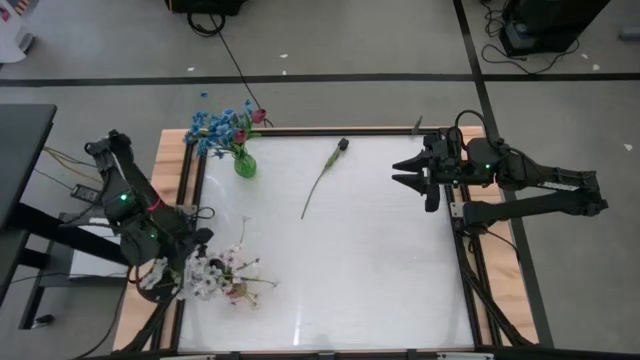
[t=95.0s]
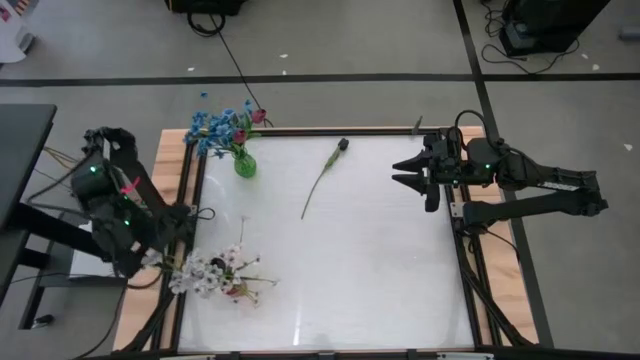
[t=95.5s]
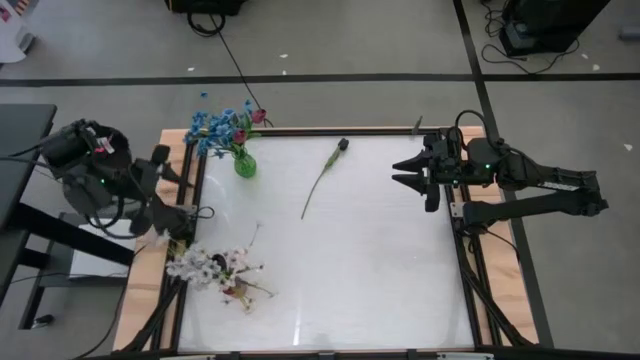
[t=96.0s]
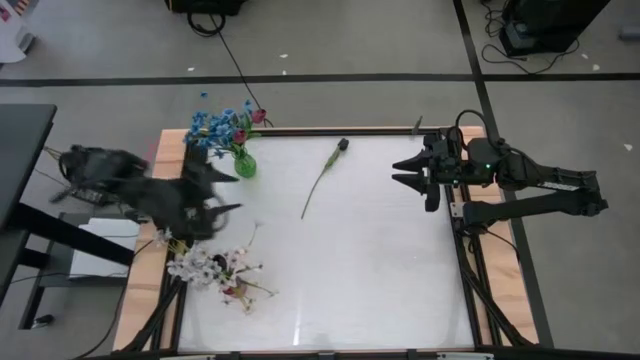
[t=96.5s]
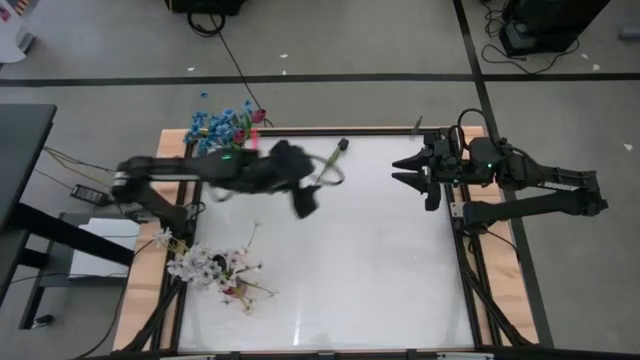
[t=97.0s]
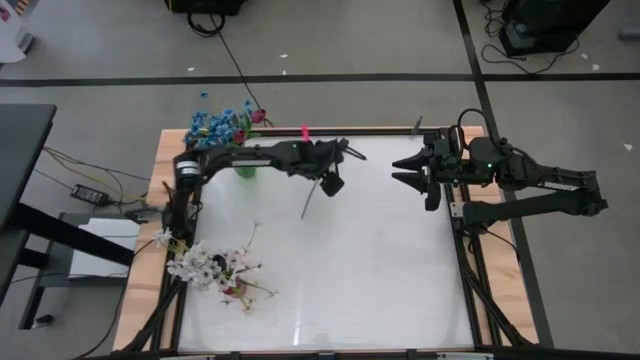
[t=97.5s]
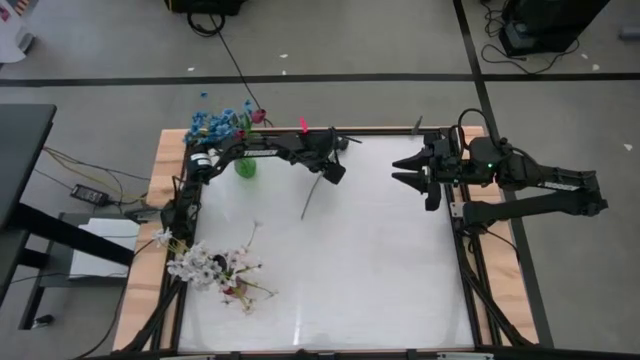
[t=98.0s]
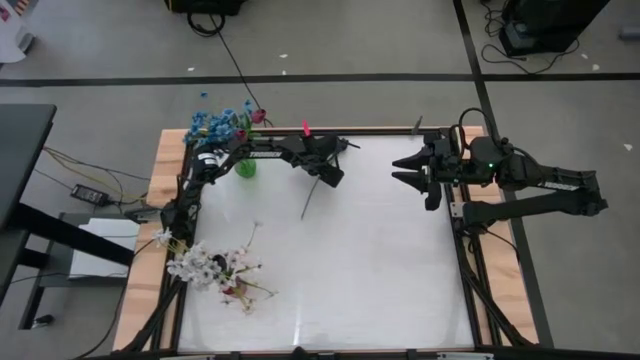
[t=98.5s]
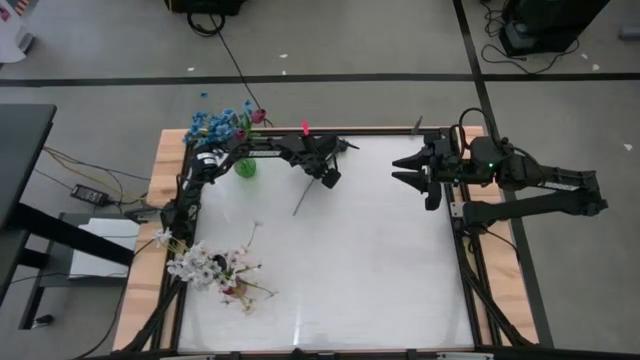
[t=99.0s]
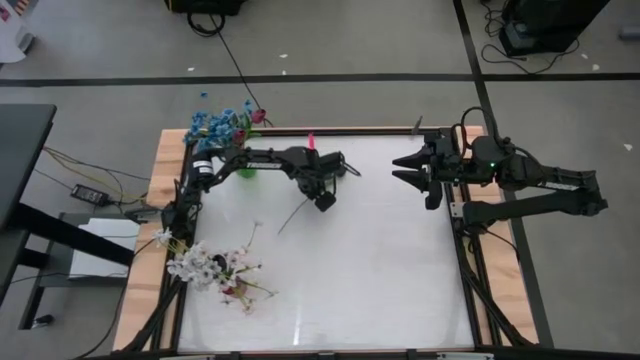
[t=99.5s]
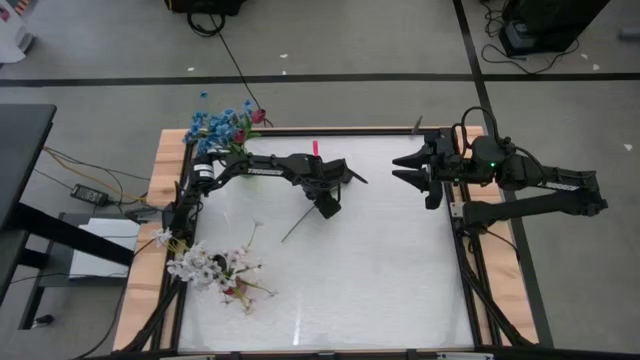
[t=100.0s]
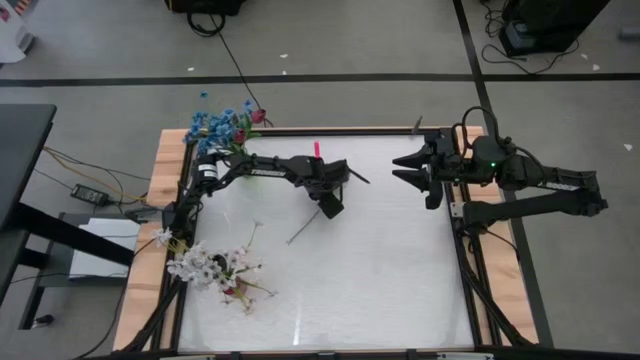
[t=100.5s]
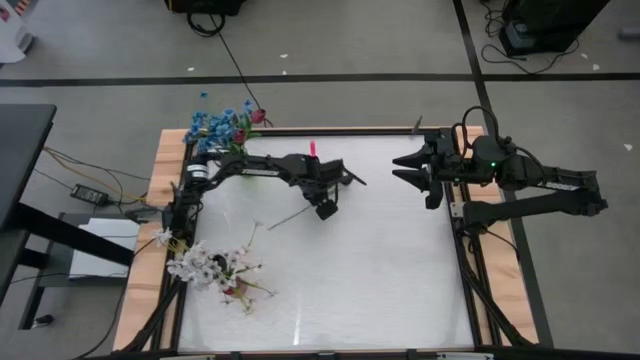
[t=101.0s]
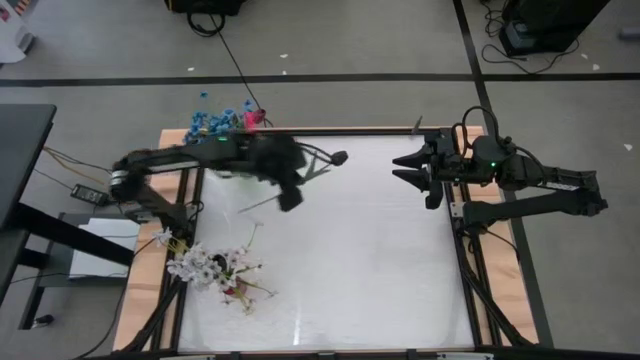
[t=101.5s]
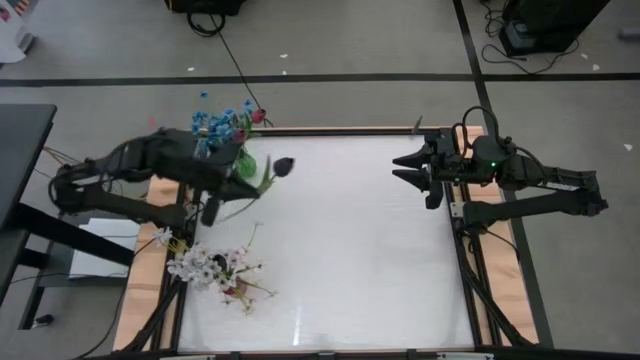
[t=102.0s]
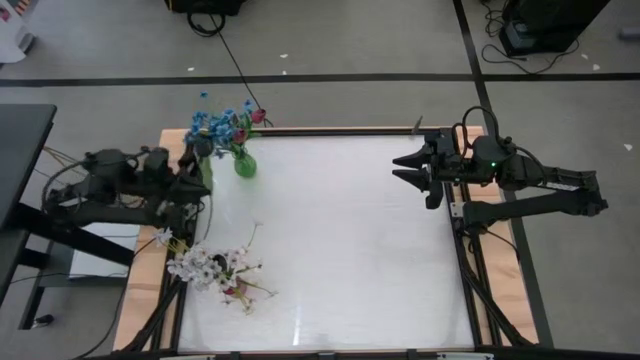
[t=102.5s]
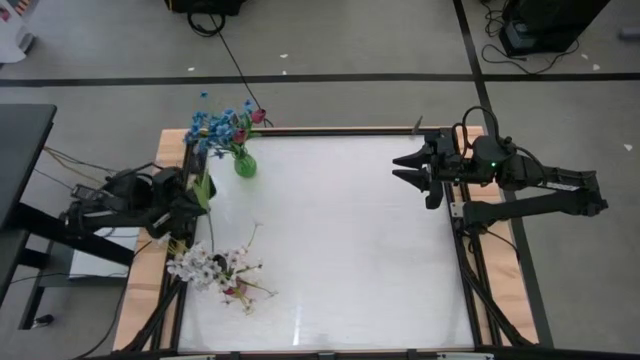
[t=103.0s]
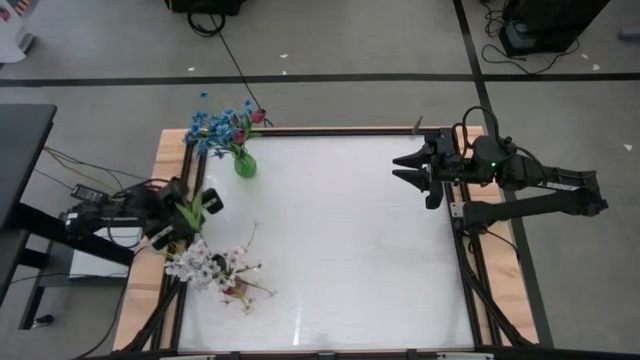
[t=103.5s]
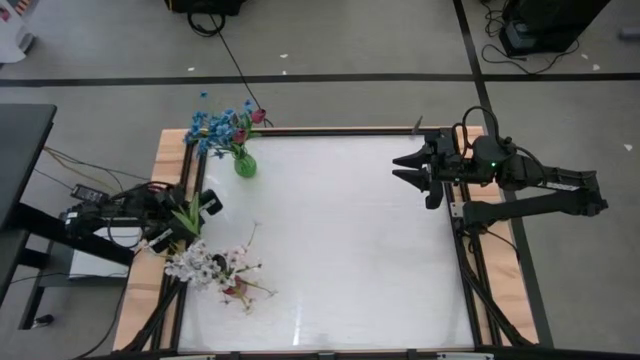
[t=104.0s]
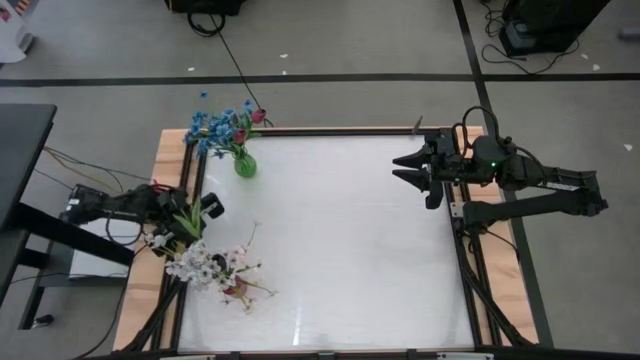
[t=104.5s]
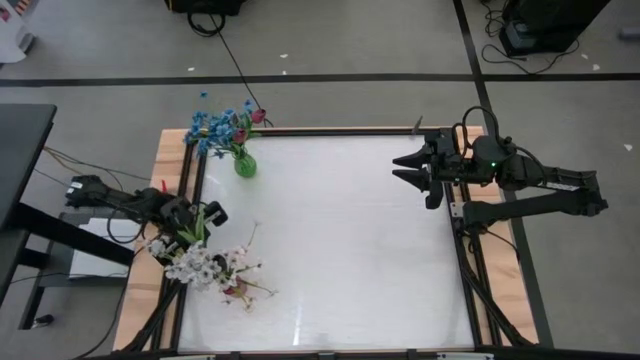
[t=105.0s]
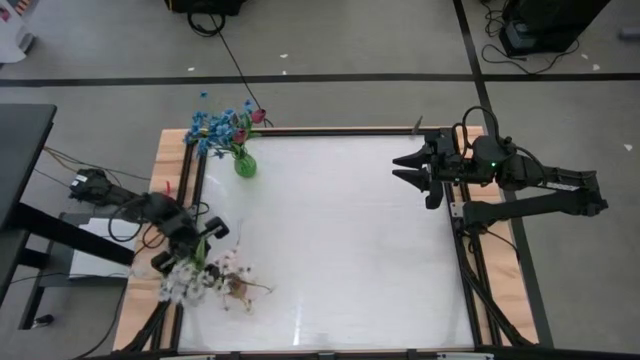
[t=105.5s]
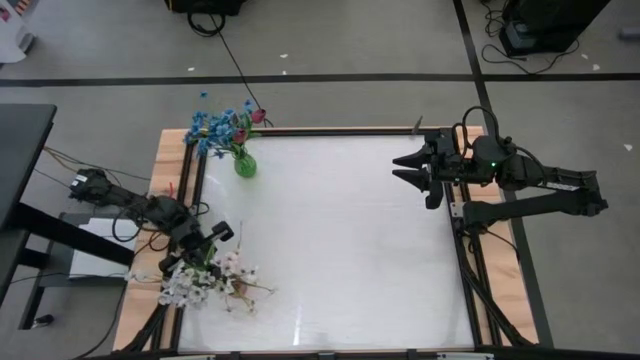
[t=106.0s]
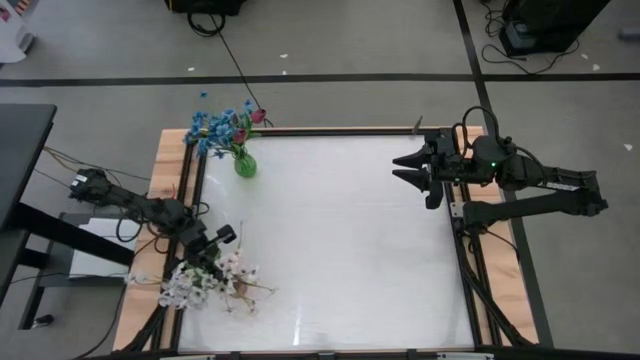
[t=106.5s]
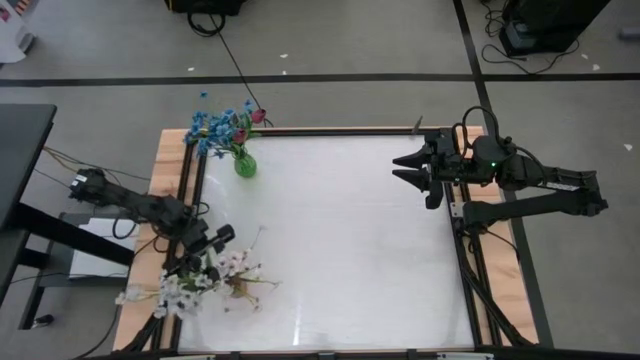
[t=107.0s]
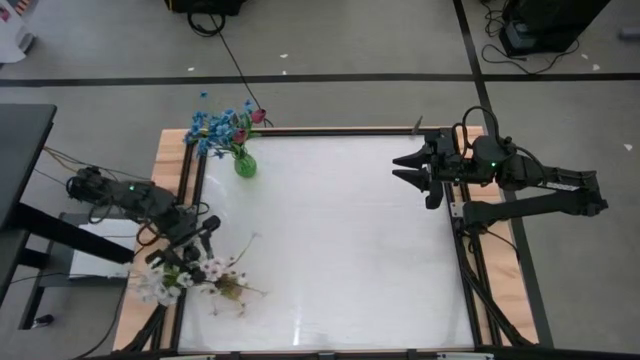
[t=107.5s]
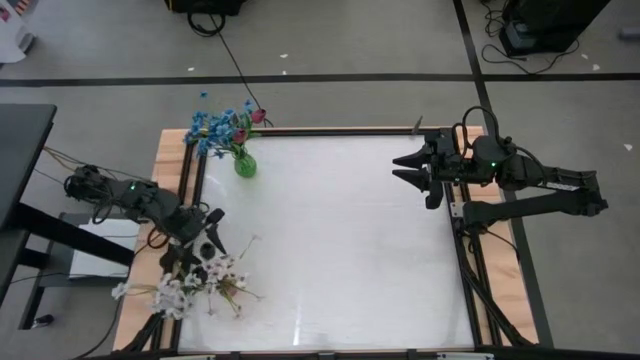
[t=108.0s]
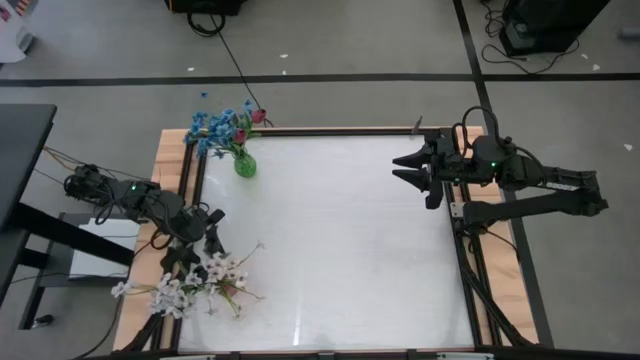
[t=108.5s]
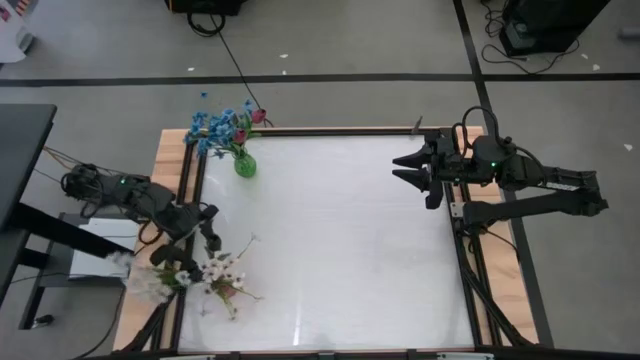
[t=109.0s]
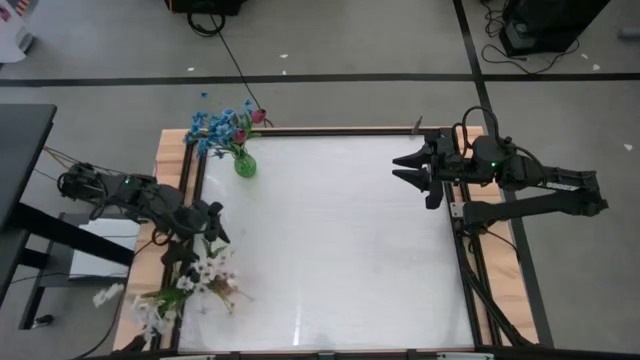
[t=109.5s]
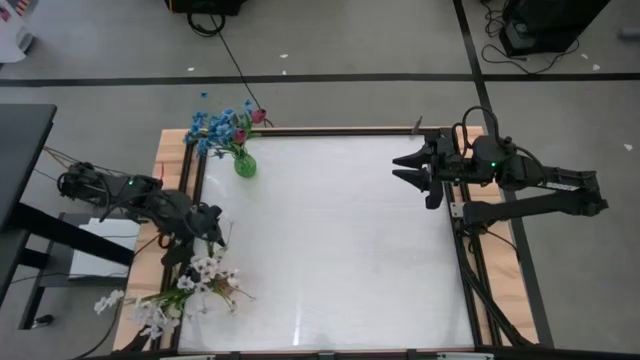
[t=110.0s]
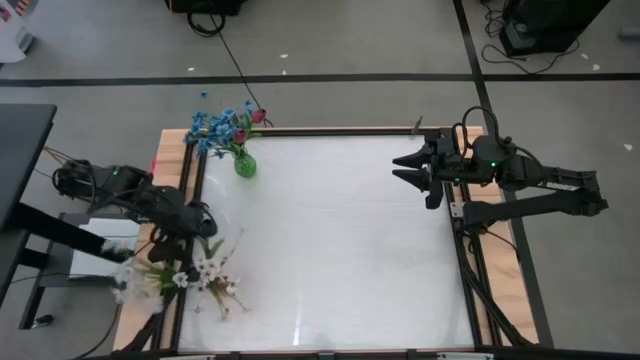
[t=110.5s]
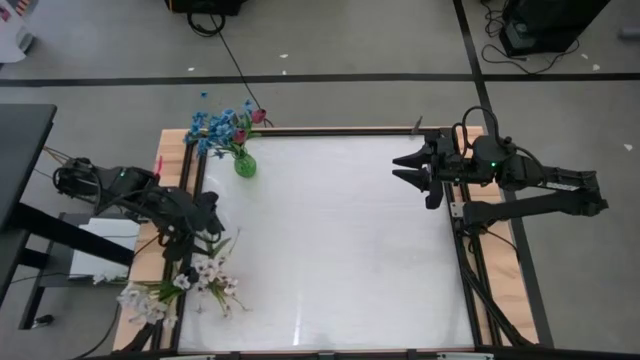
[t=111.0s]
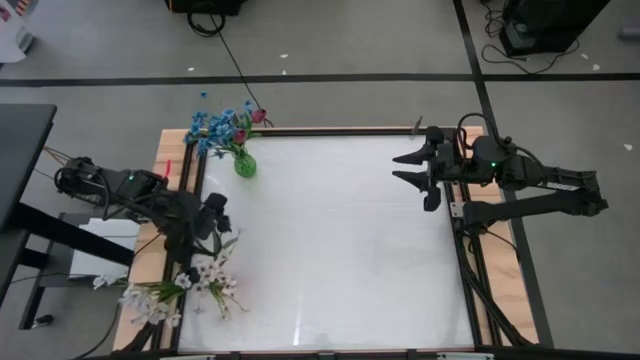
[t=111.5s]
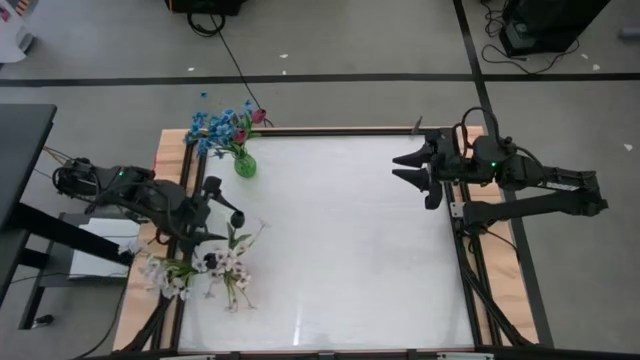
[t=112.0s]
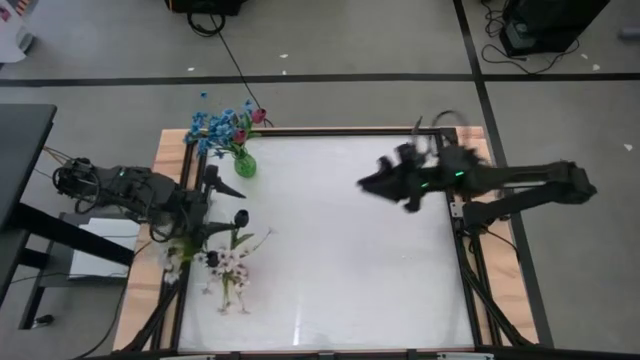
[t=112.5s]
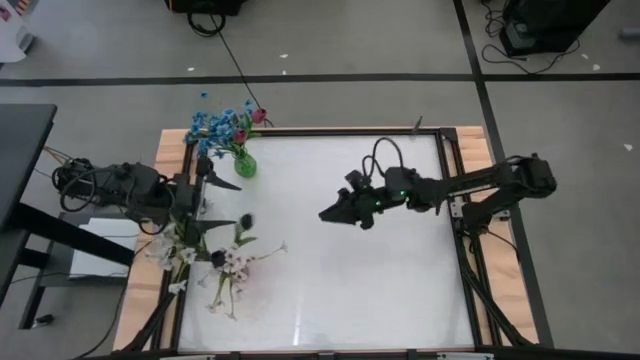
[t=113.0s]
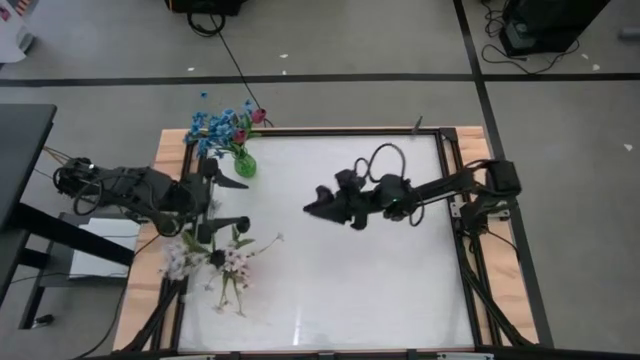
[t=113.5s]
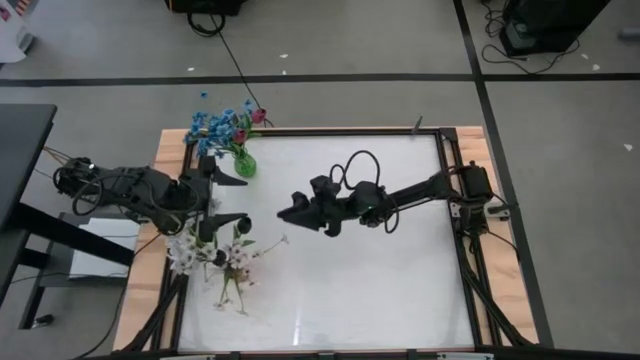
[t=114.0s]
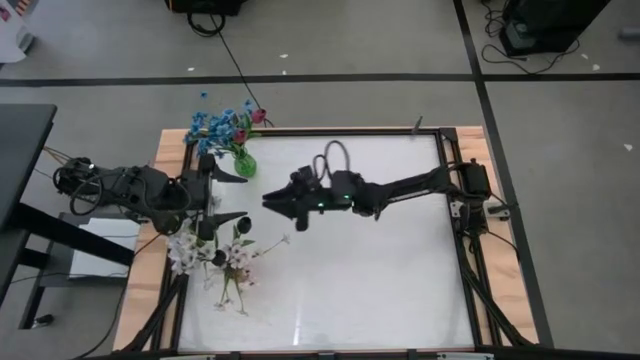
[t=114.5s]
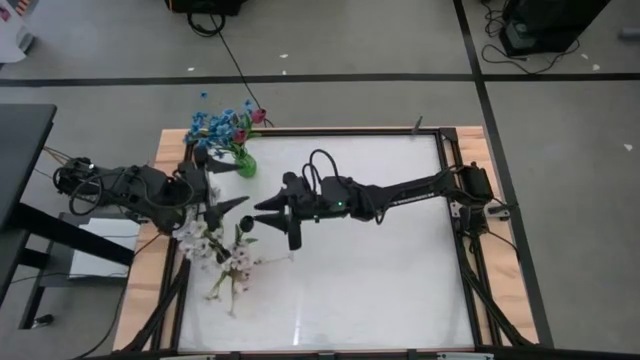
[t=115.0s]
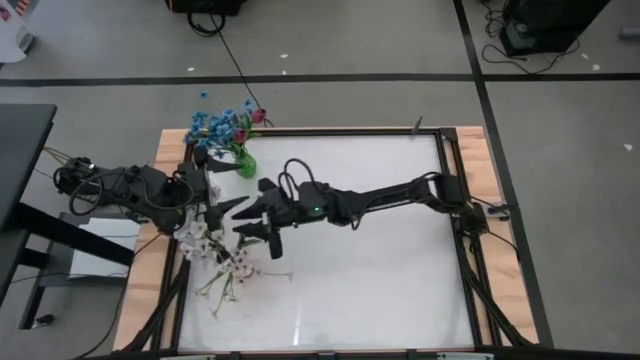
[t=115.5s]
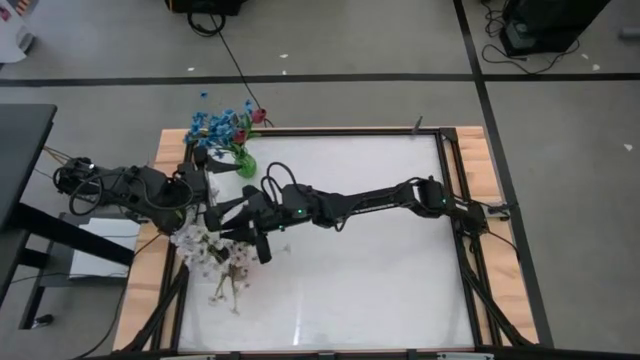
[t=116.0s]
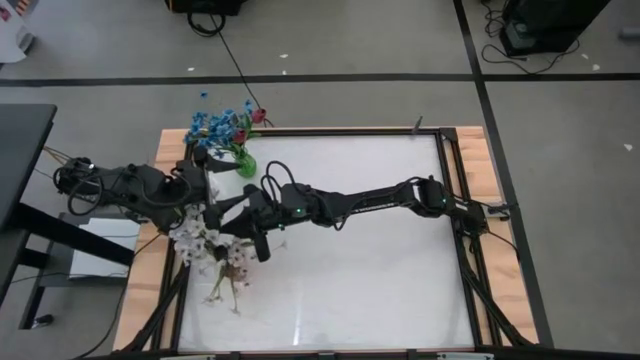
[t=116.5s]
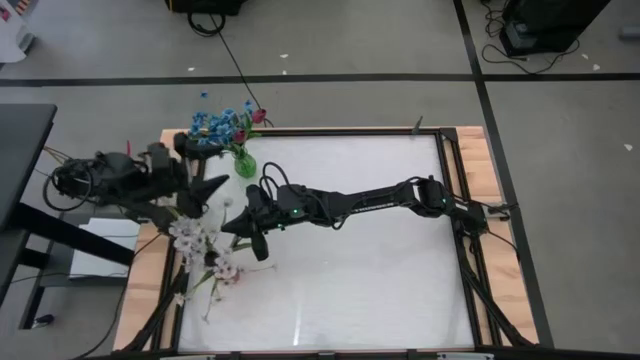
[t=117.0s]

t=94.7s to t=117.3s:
Task: Sort flowers into vase by color
Put the black flower into the red vase
